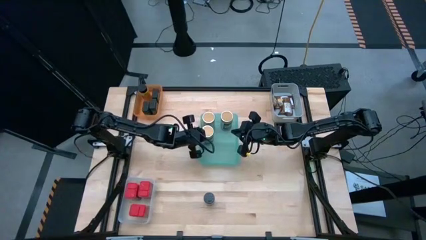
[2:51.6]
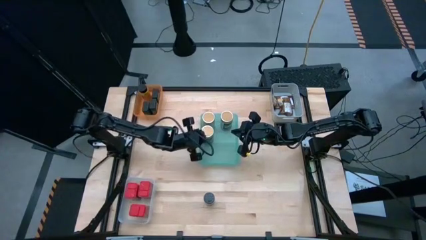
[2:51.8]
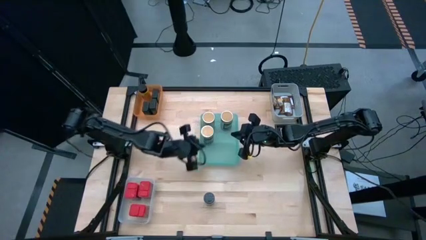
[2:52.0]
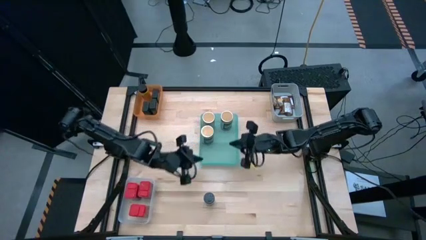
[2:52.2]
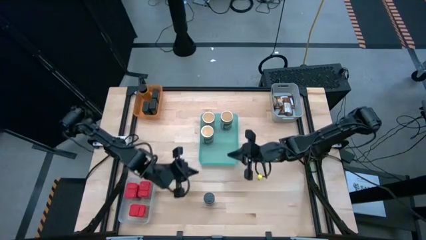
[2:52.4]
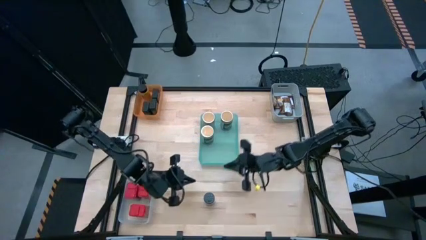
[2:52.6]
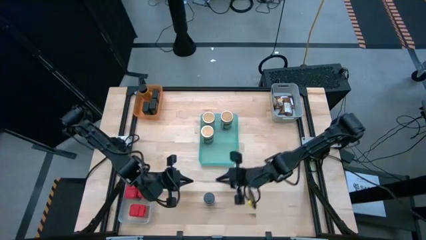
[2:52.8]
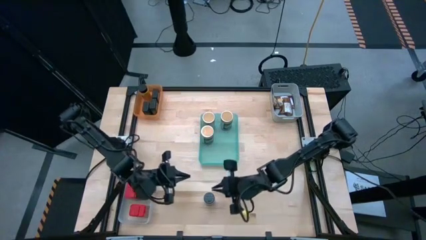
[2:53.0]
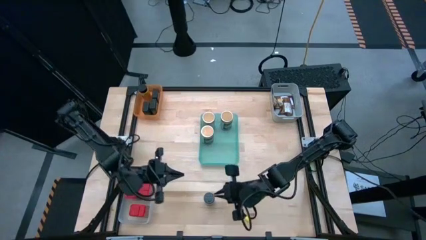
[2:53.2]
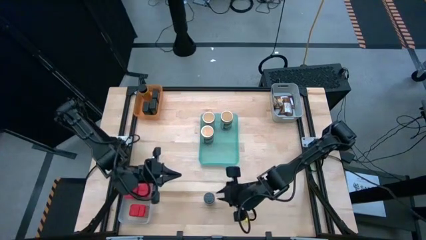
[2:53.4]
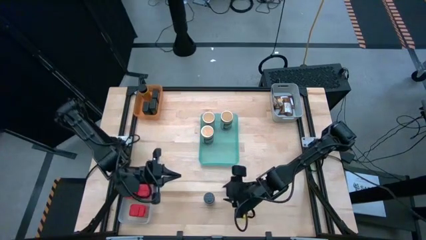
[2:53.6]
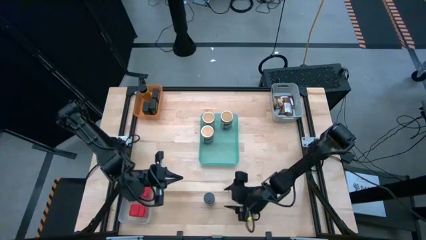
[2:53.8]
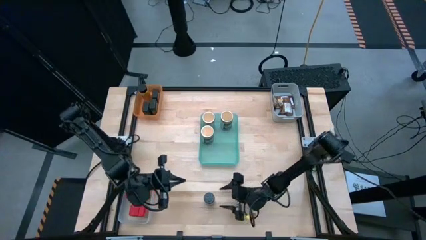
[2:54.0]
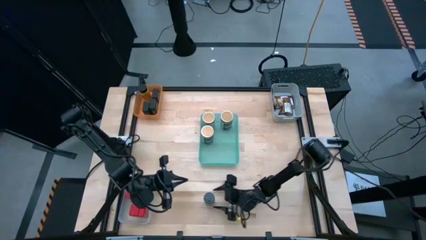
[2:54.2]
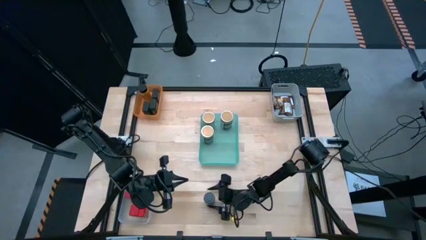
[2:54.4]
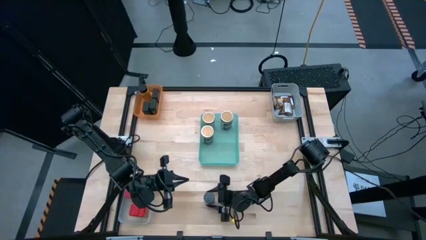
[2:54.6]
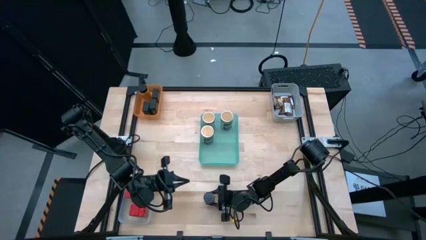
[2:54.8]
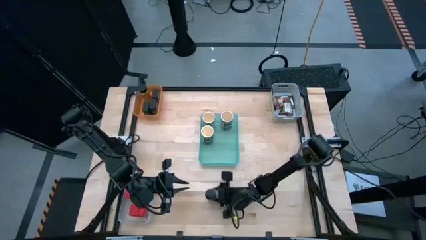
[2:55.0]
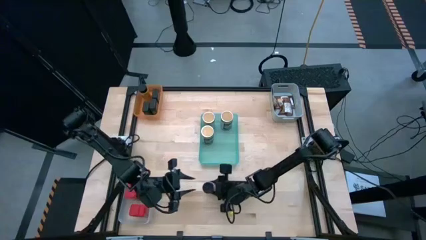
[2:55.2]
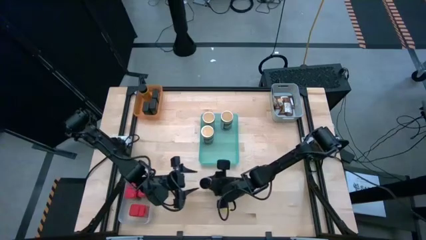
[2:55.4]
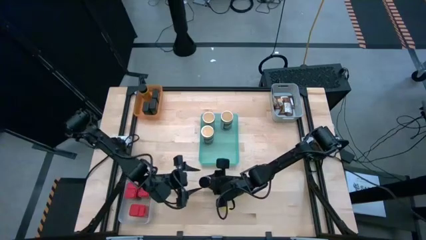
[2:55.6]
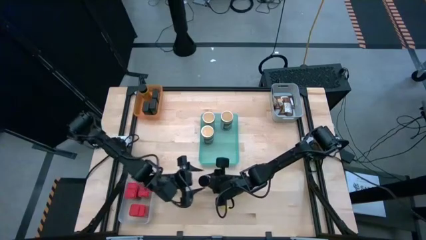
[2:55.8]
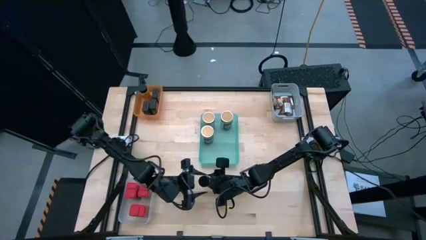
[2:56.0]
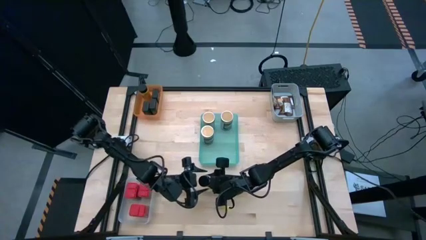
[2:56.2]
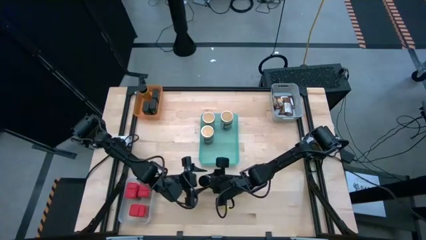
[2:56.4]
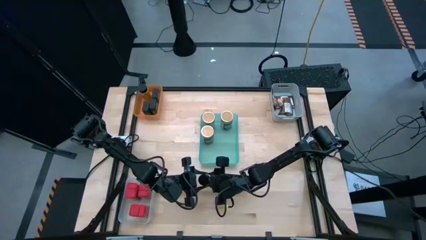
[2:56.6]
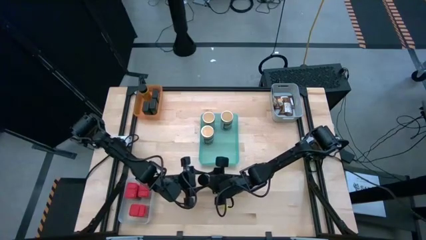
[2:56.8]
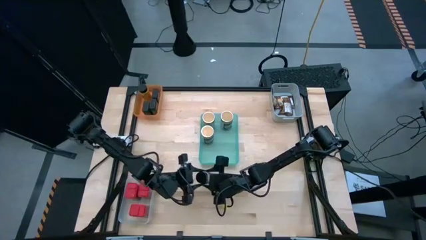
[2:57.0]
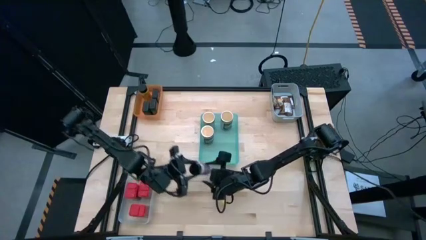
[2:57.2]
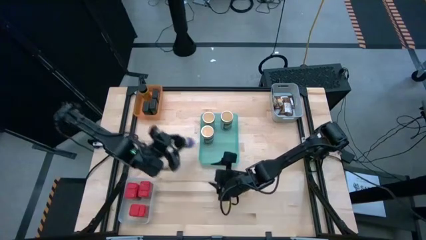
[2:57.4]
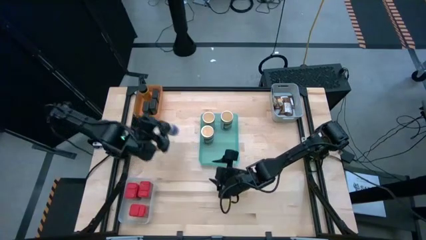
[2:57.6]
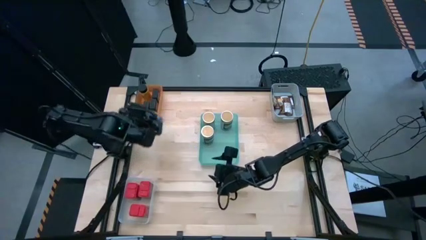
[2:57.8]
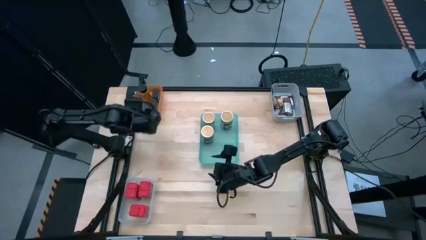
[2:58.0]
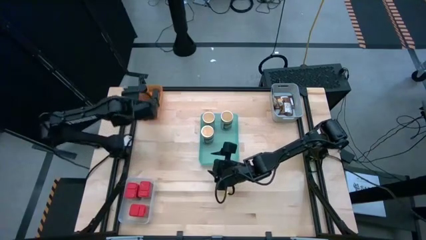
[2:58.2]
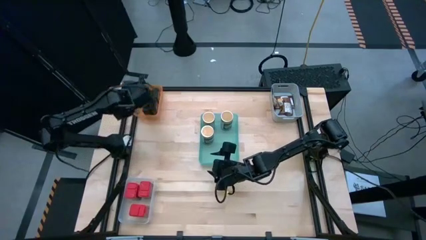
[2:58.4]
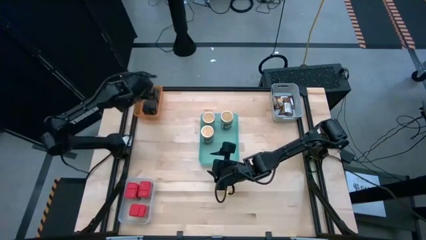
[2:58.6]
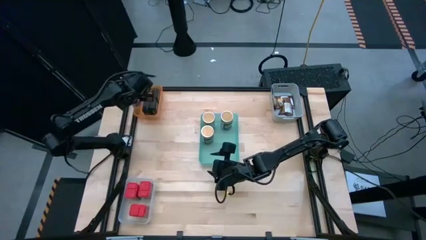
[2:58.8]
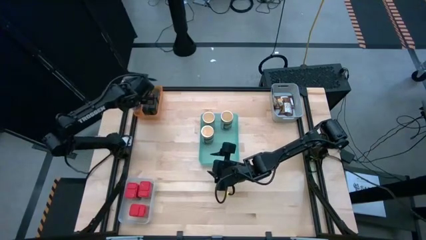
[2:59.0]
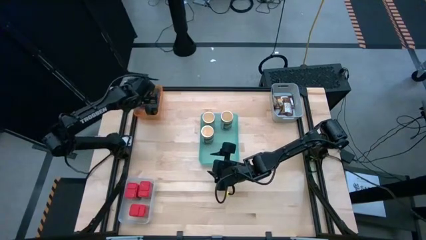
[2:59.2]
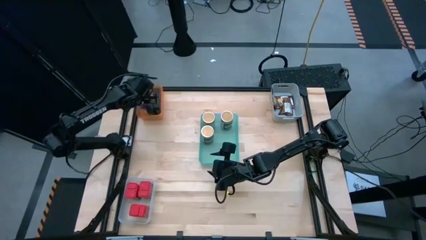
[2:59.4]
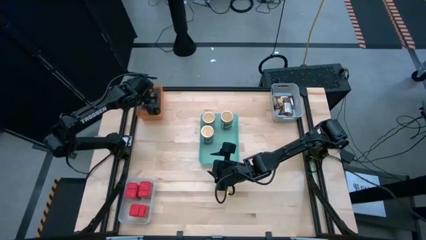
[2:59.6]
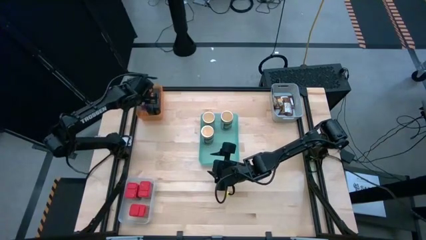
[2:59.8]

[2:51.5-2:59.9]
Task: Sort spices by type
Put the black seasoning bottle into the orange bin

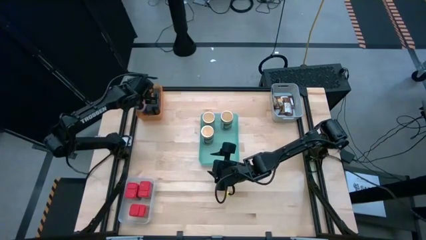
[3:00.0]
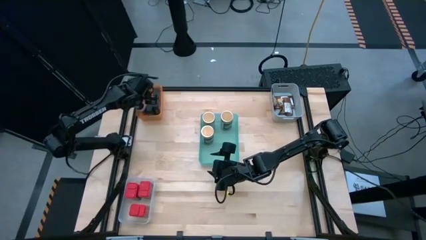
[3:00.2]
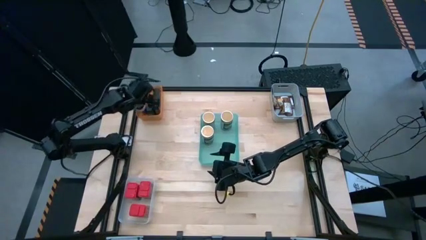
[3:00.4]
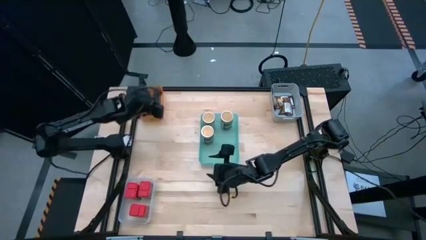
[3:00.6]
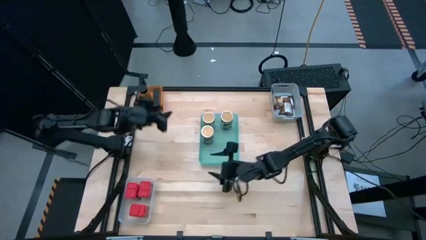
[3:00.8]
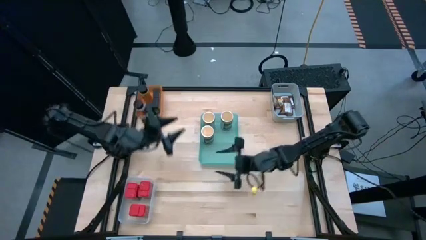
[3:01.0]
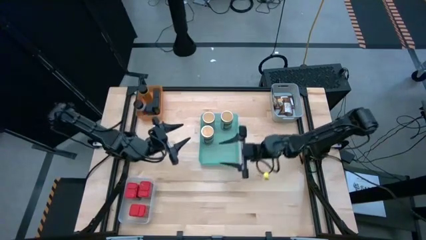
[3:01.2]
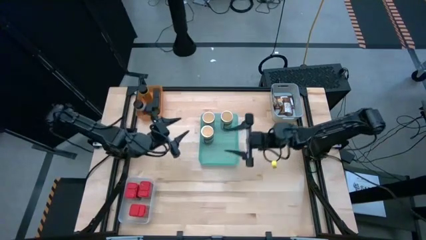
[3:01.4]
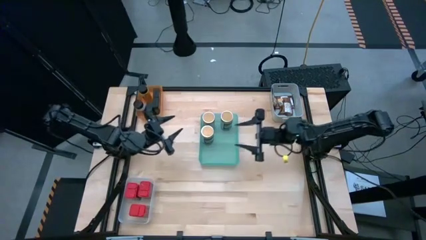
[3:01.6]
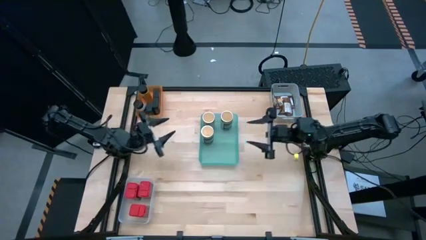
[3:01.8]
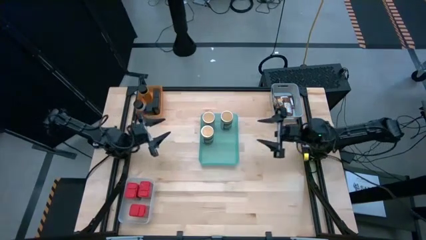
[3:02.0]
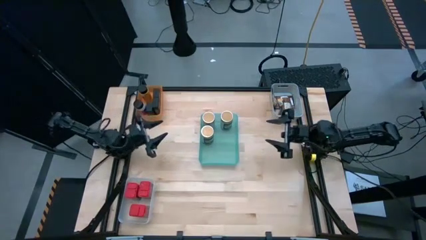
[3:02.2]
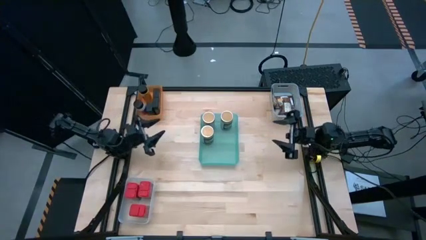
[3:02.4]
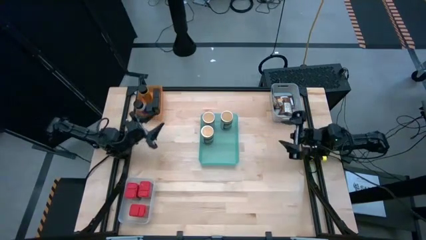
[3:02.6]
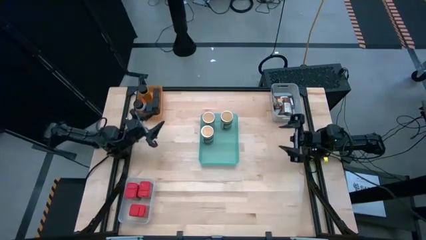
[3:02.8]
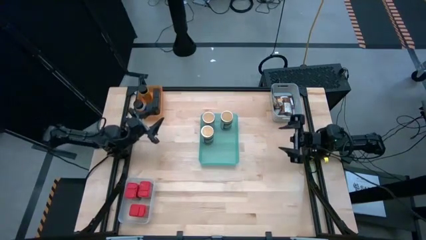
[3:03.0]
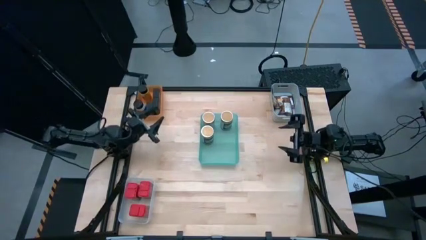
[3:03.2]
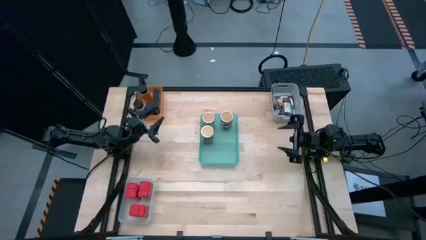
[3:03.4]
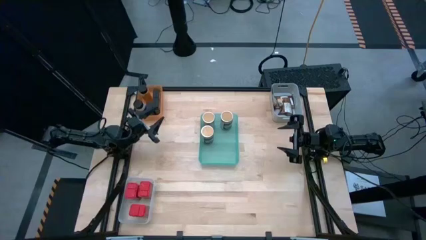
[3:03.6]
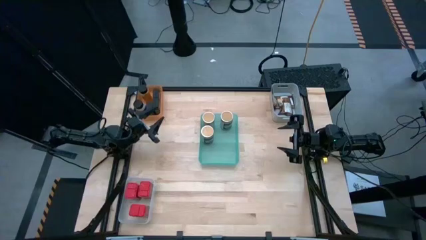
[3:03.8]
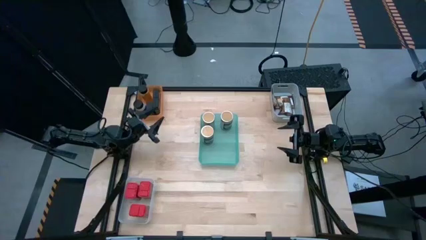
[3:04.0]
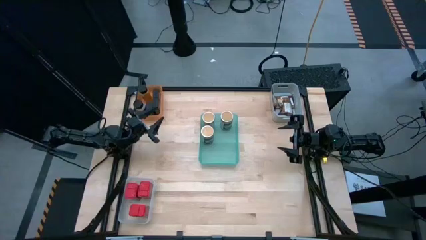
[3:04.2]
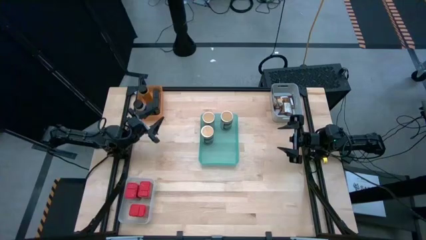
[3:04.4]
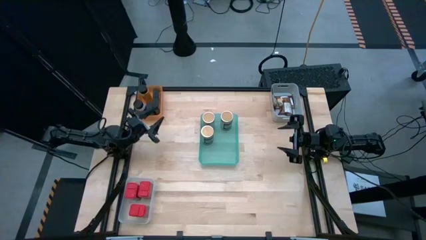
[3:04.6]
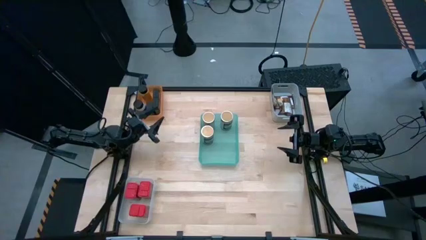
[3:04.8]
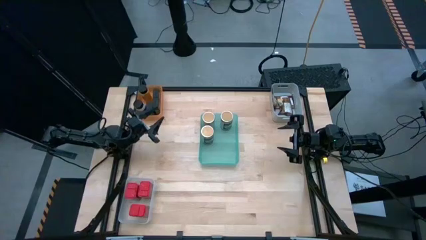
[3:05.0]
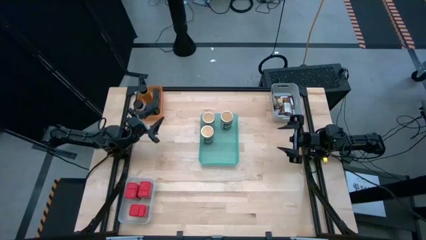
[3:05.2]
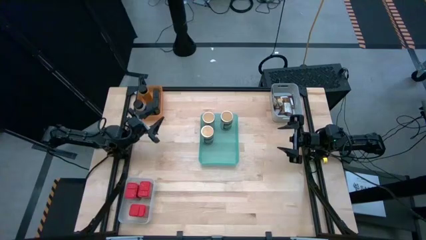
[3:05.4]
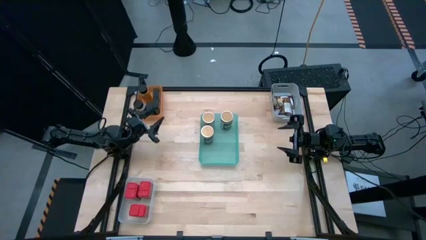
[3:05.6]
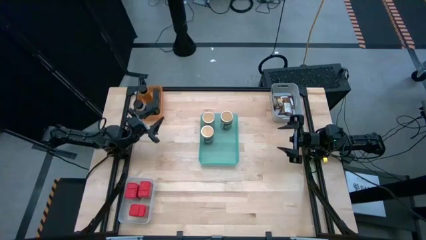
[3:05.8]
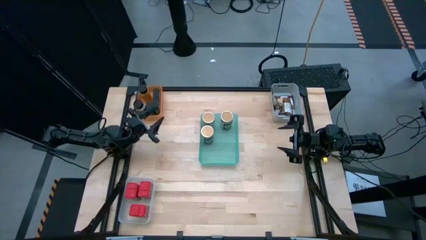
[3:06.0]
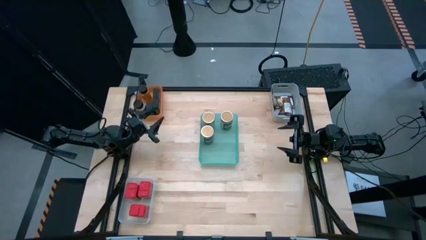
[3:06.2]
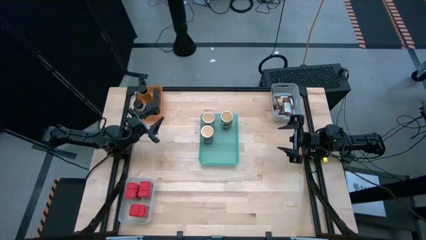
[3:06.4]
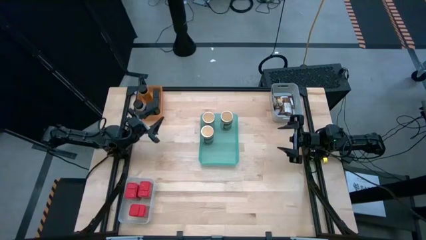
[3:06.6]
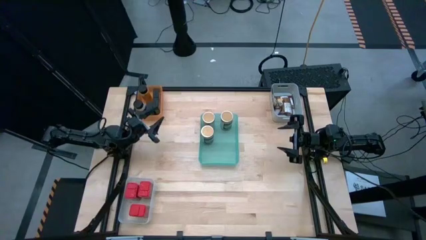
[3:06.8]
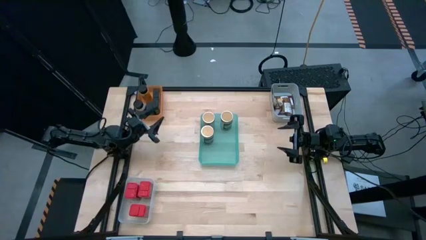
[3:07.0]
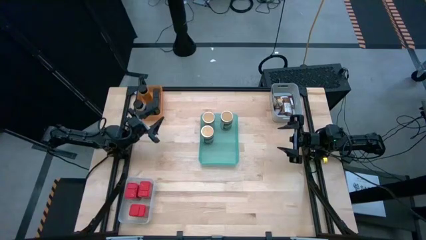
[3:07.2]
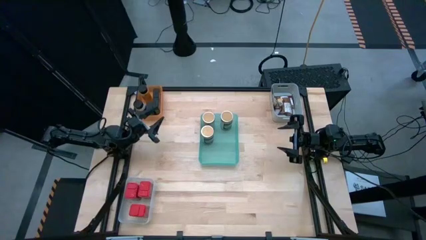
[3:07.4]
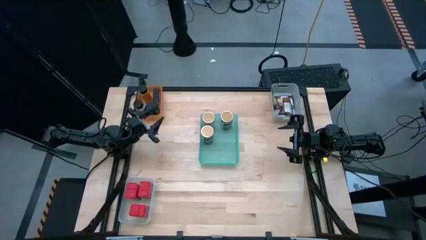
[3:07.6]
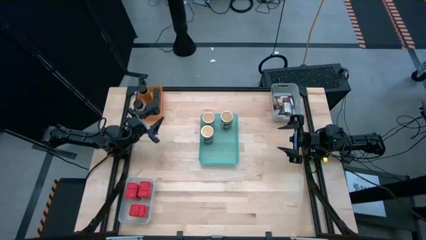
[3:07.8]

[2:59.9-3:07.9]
Return to Home Position
